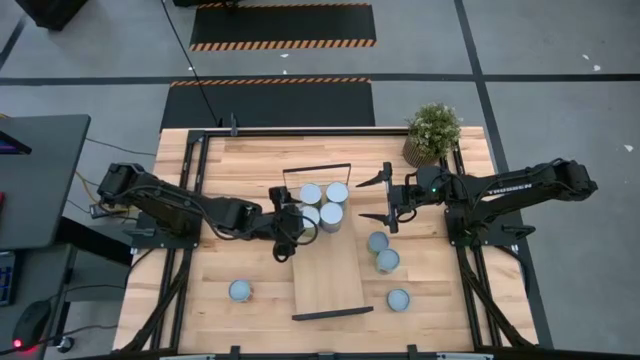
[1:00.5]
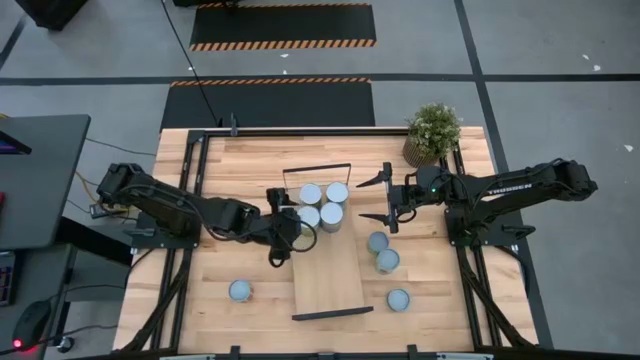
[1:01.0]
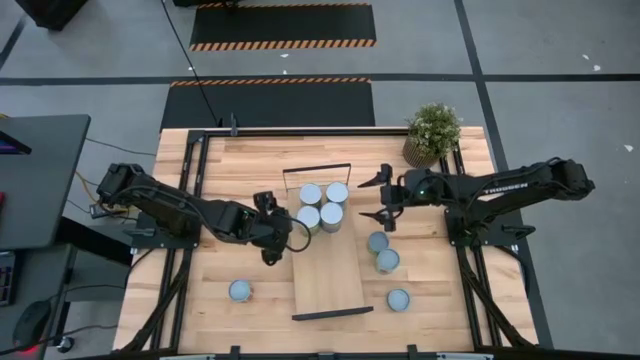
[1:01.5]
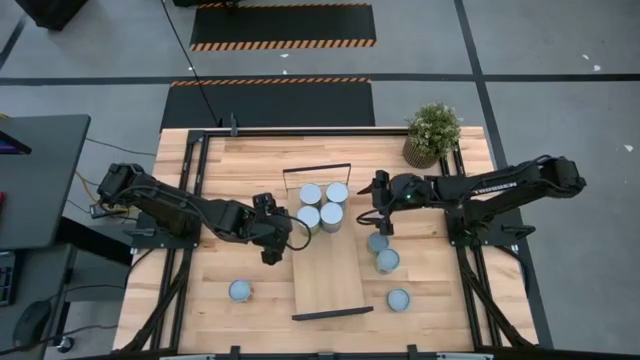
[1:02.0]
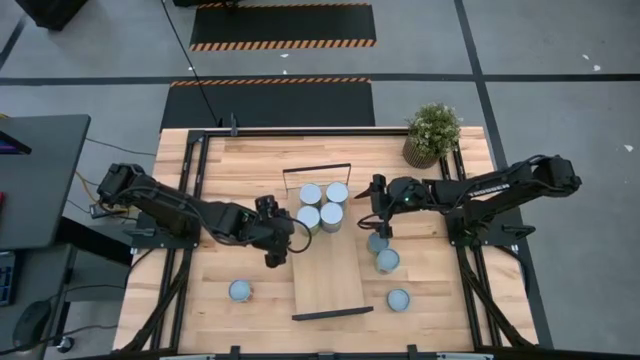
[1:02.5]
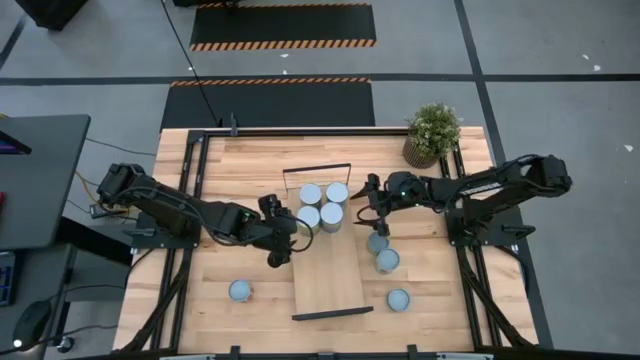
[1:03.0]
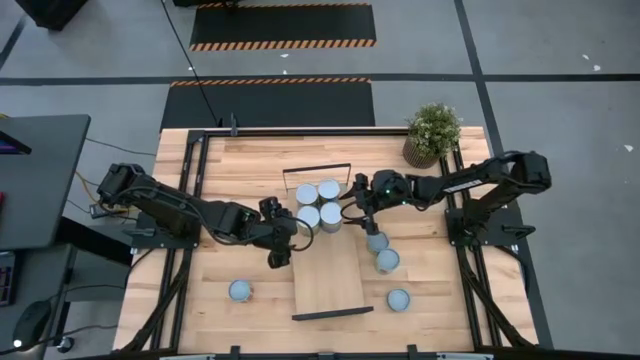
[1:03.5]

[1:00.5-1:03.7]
Task: Pick and place cans onto a shelf
Adjust the canned carrots on the shelf

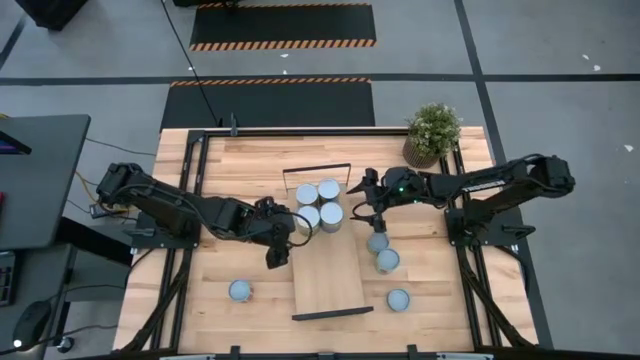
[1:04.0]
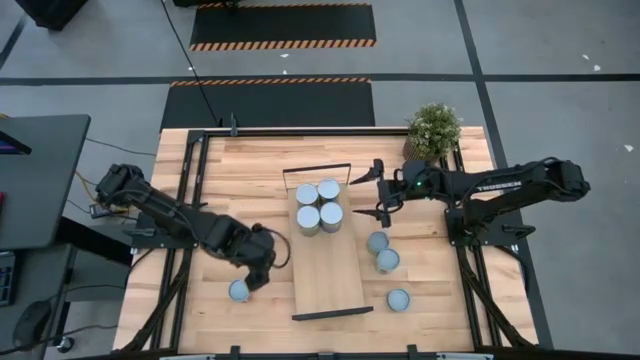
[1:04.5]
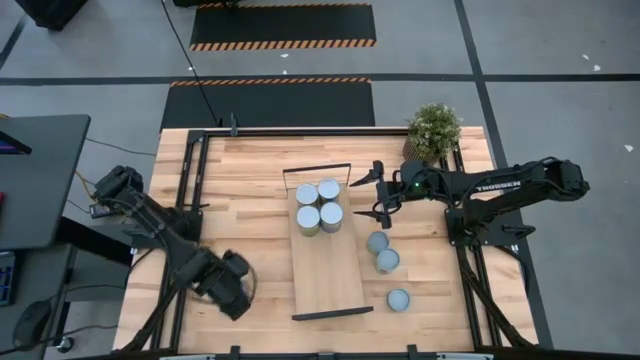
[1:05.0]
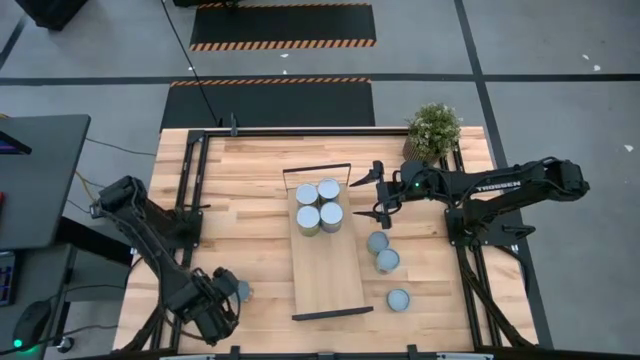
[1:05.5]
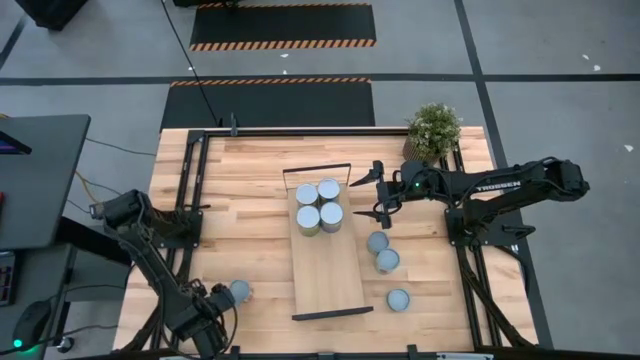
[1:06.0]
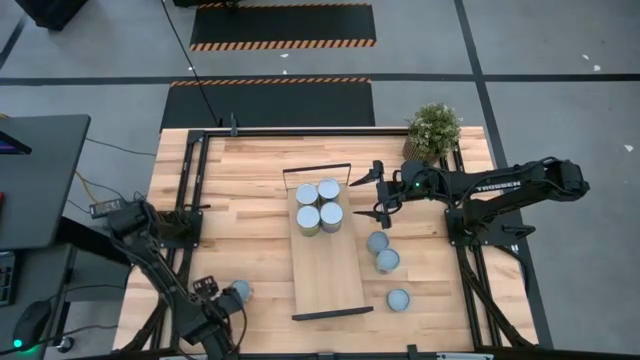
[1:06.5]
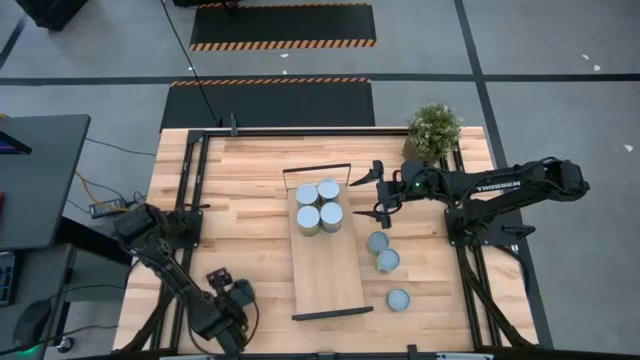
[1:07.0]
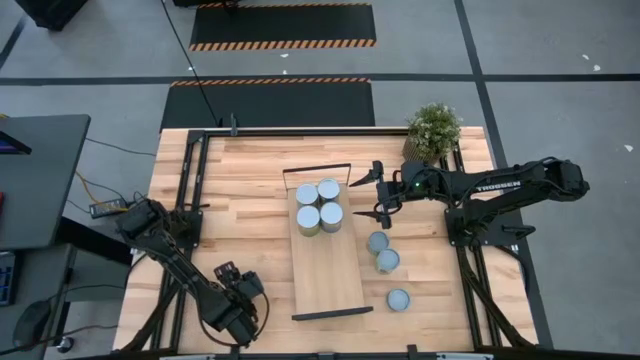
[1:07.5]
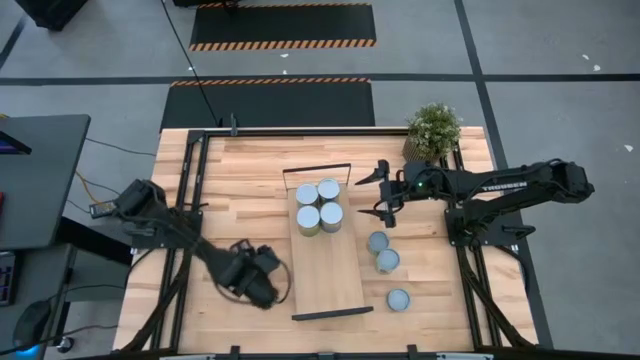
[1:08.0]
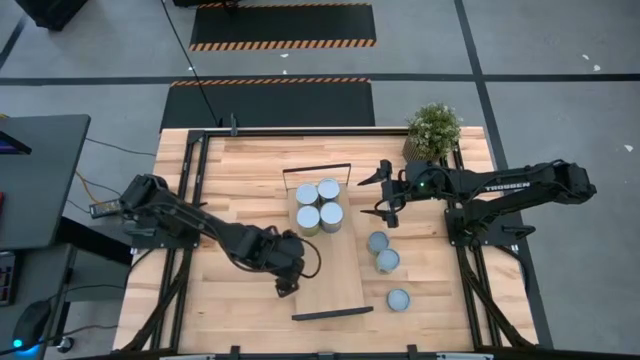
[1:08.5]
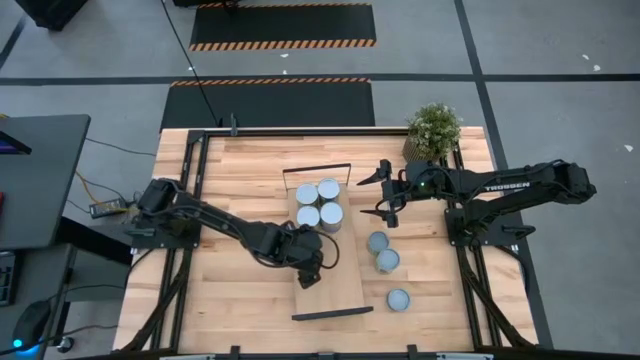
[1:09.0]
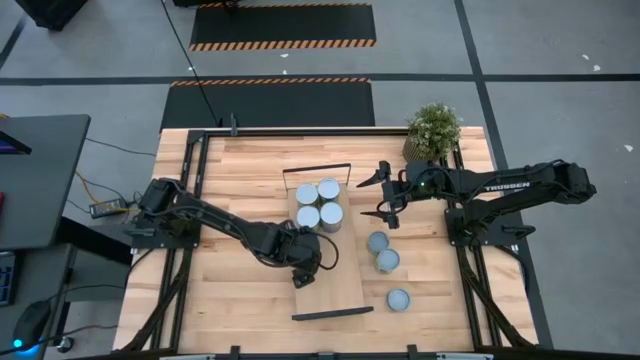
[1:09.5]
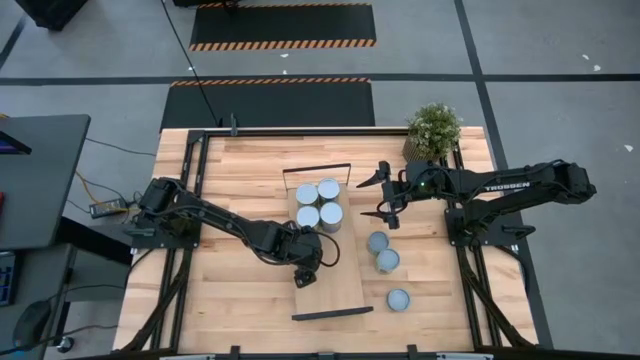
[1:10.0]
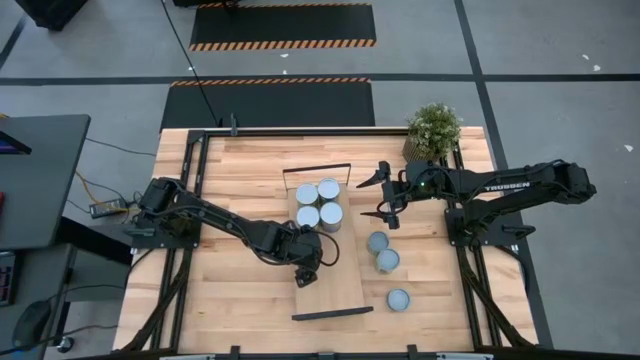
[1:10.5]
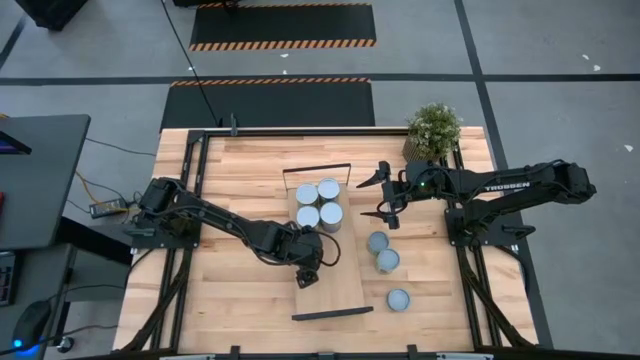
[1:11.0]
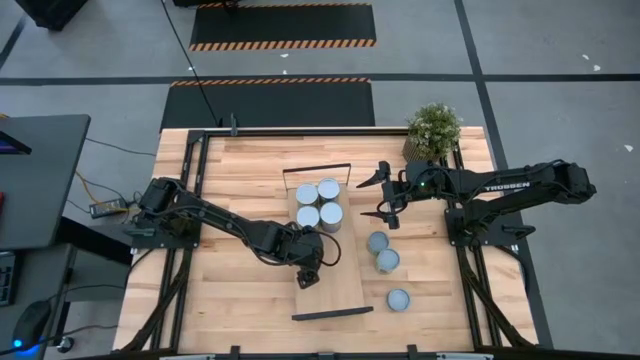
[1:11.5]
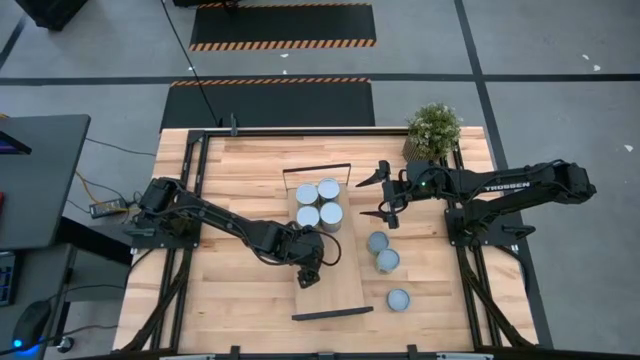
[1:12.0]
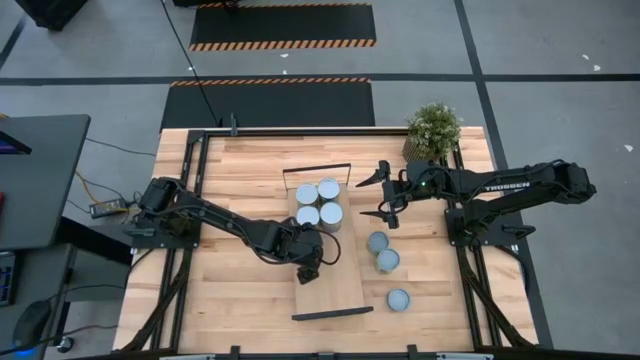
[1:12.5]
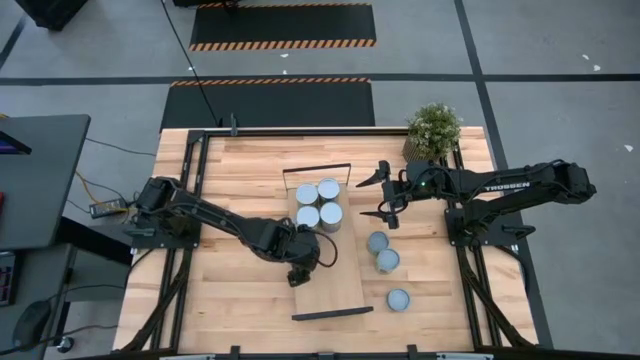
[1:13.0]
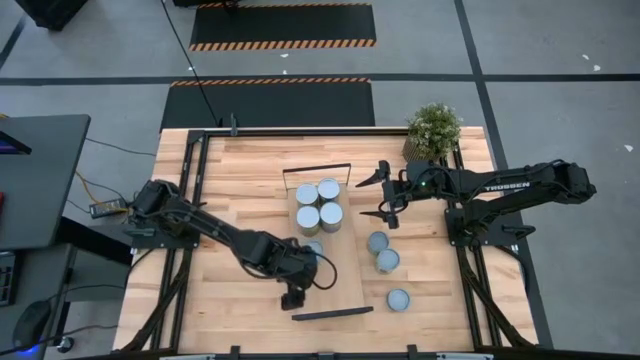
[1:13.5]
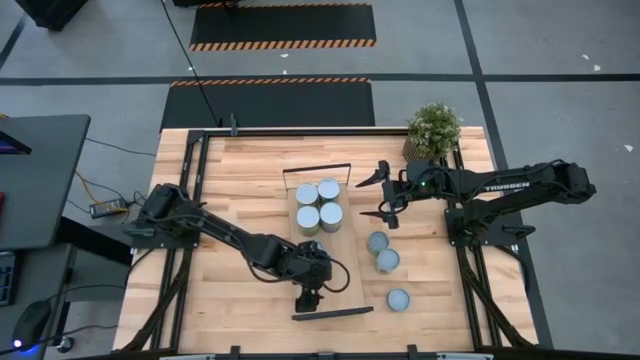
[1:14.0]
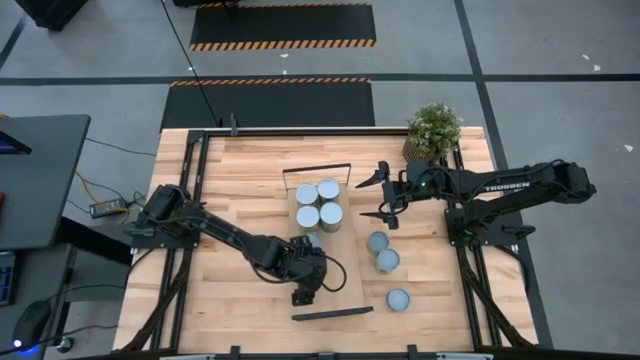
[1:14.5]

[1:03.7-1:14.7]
Put the canned diced tomatoes on the shelf

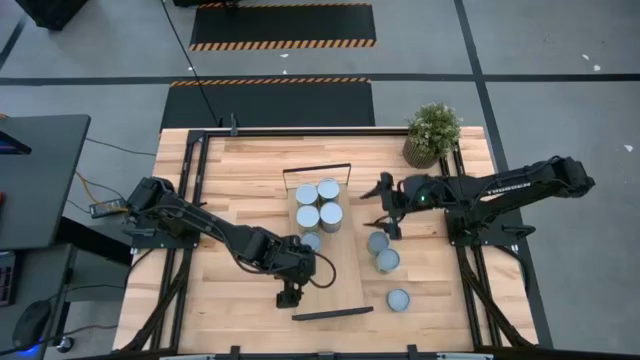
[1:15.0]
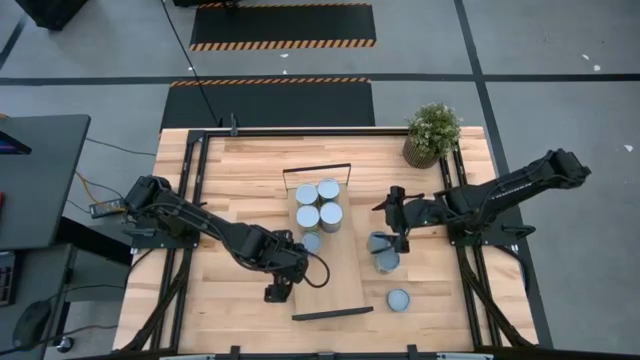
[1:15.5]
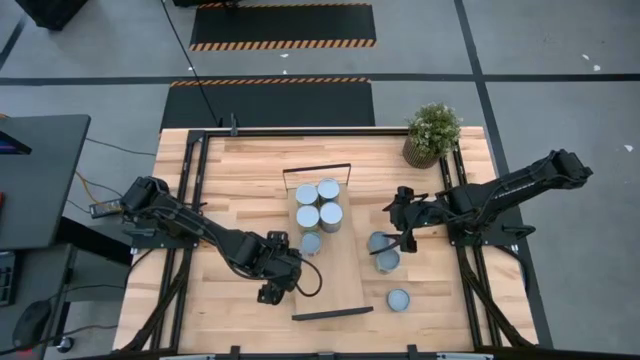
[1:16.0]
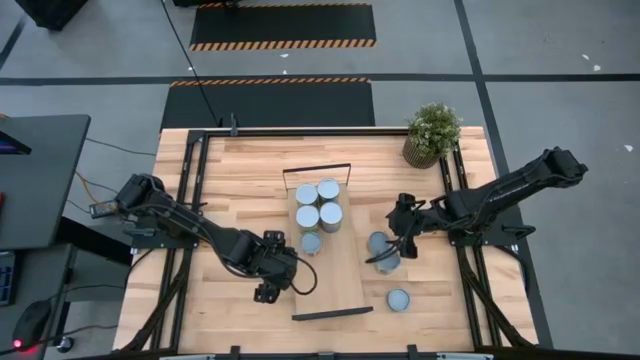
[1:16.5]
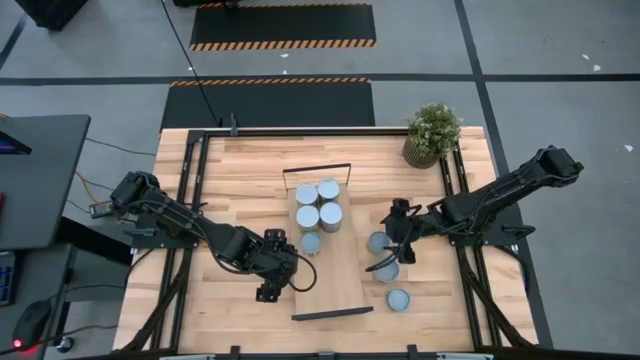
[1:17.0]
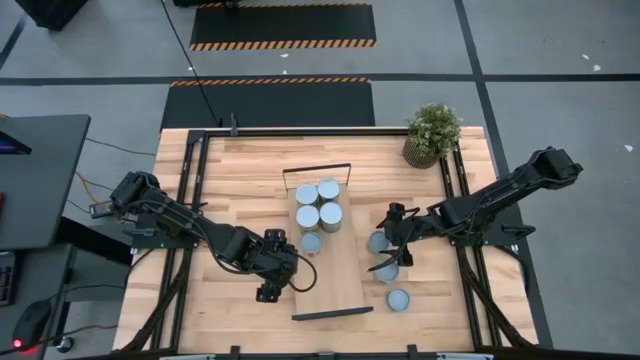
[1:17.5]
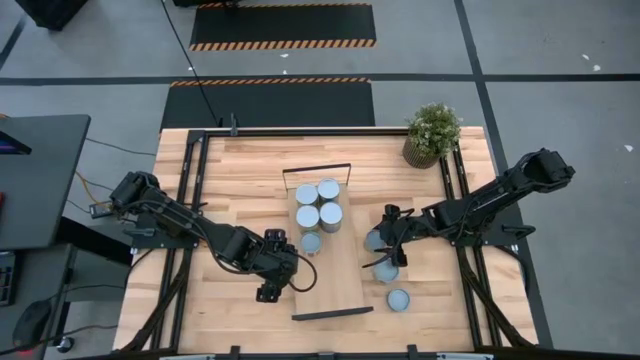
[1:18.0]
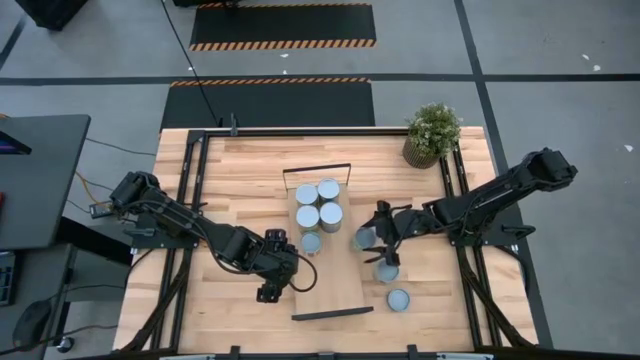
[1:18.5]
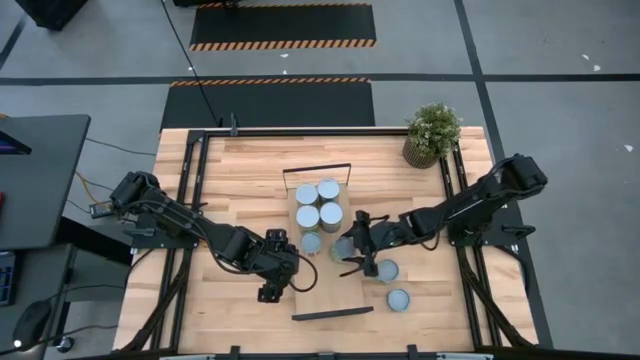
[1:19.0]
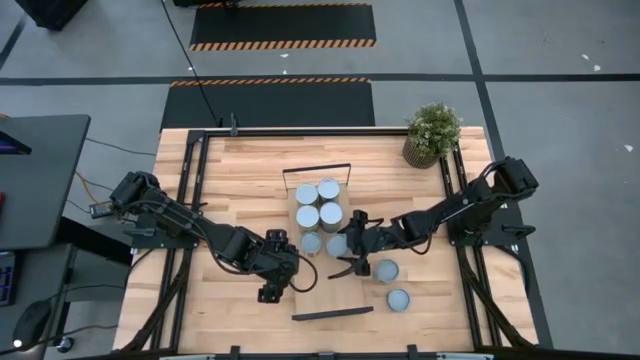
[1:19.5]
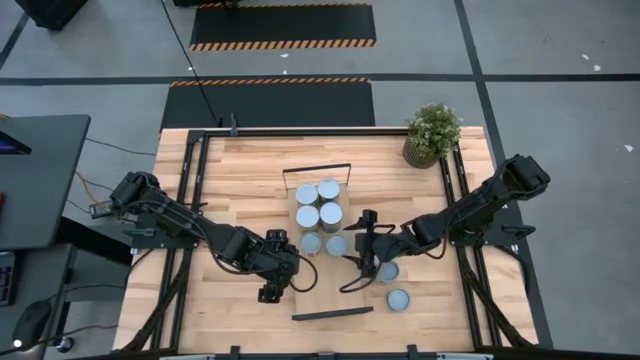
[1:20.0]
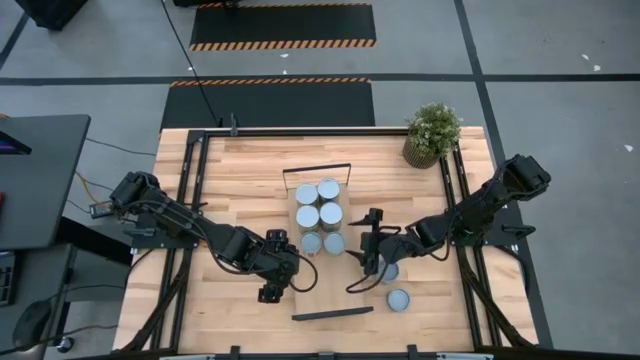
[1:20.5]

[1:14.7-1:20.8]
Put the canned green peas on the shelf

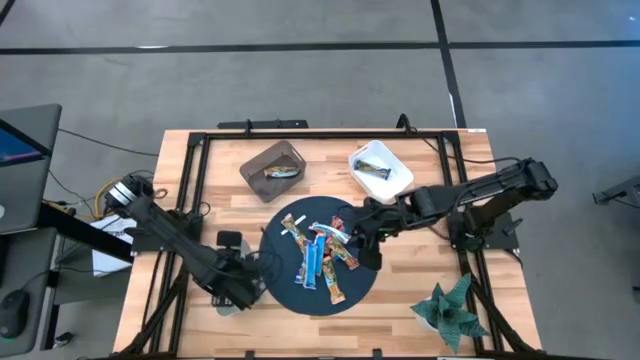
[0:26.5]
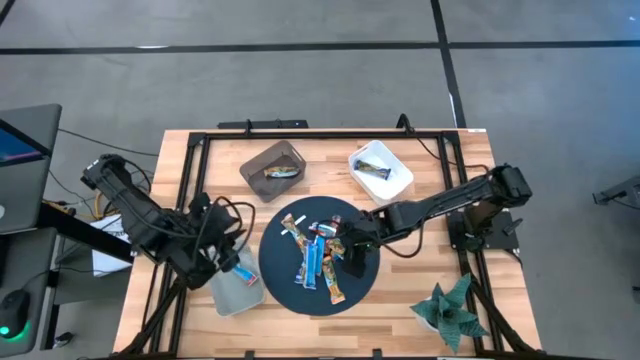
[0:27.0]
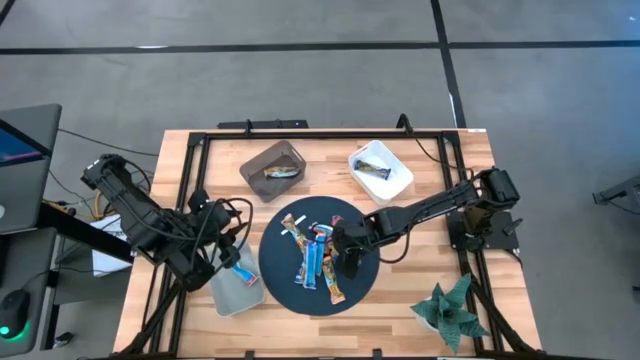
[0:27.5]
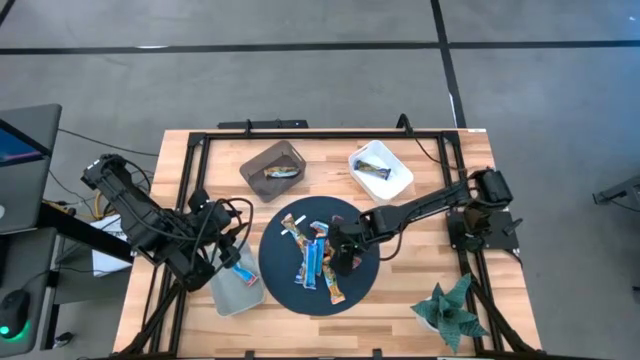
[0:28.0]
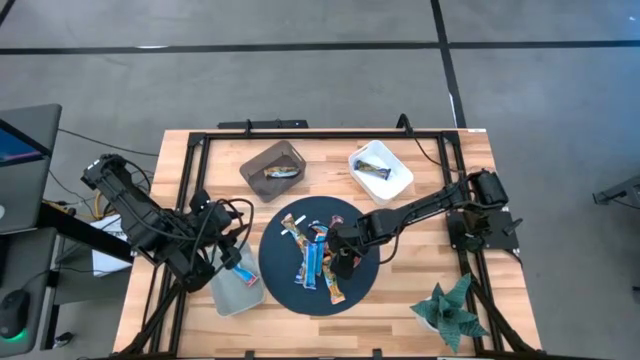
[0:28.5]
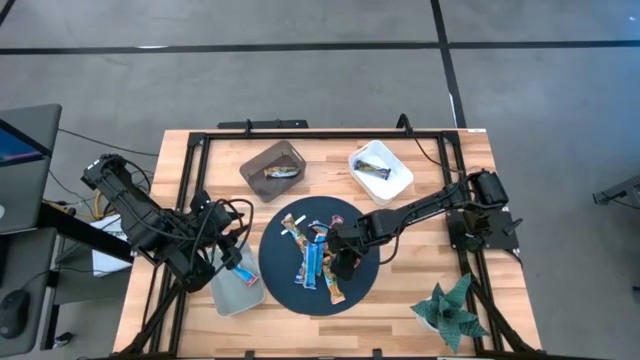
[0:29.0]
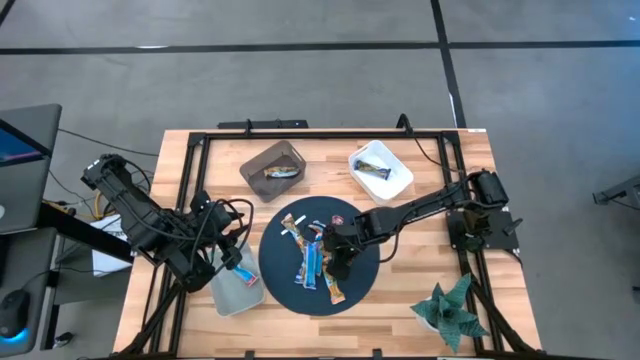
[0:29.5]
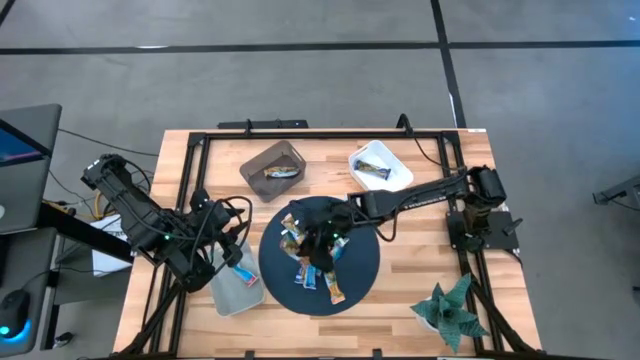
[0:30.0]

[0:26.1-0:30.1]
Task: Pick and place Granola Bars by type
Put the red granola bar into the gray bin
